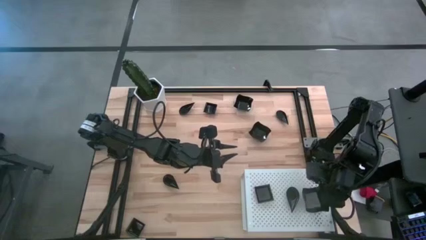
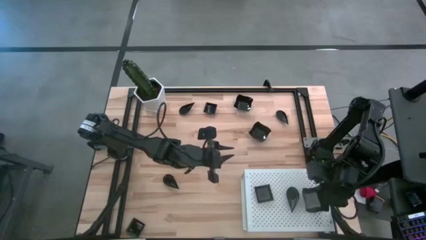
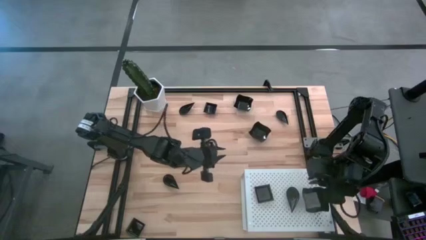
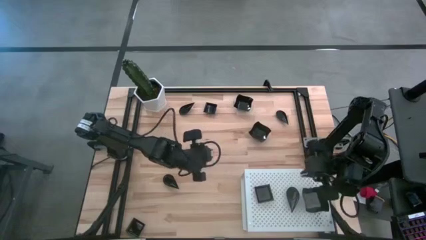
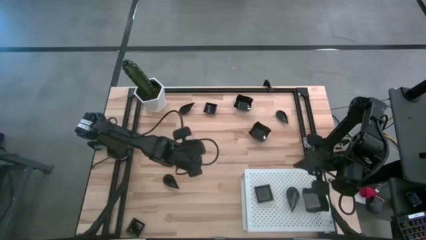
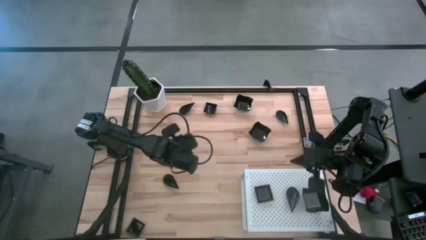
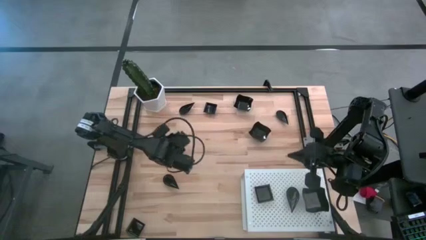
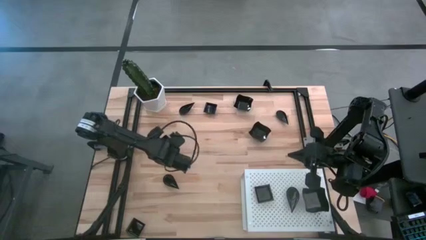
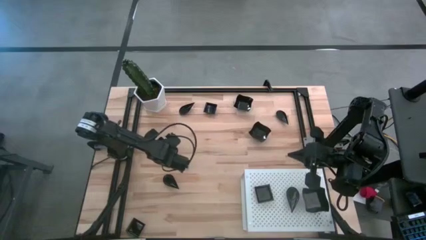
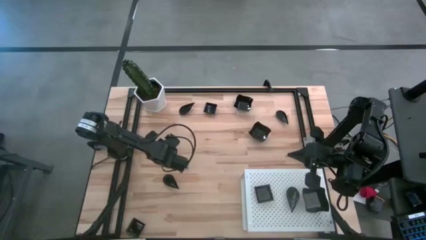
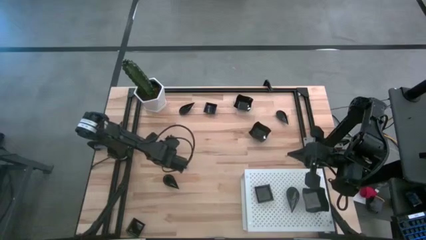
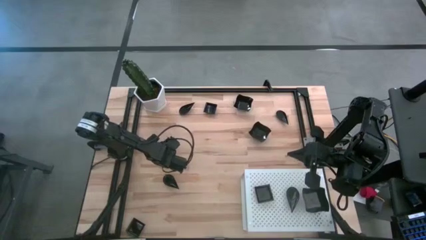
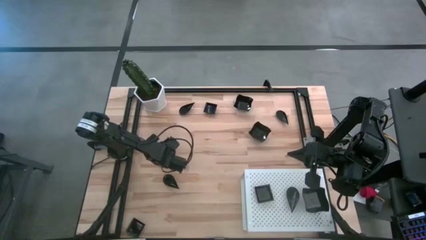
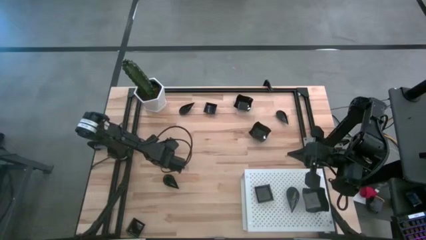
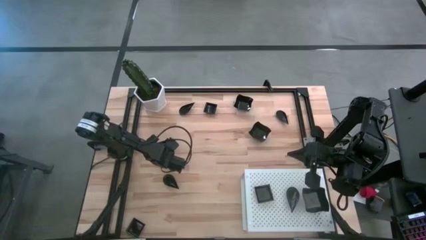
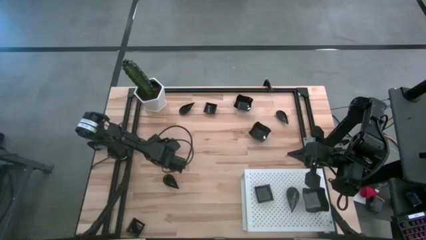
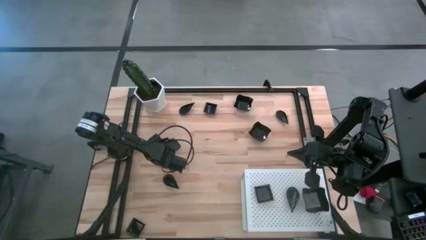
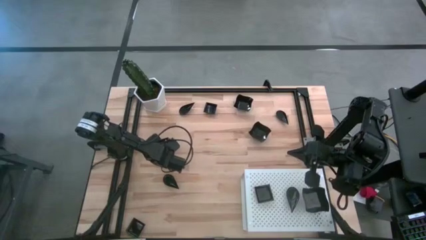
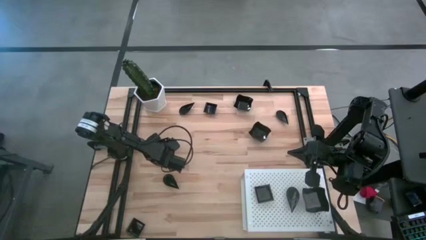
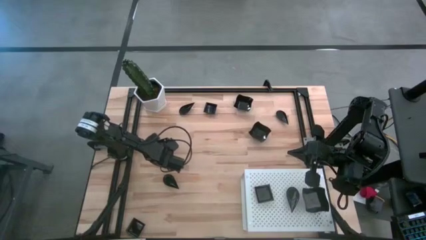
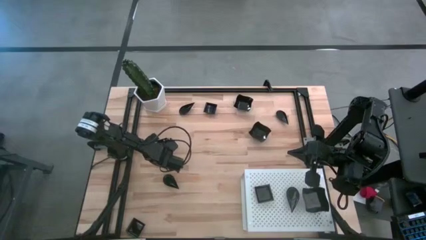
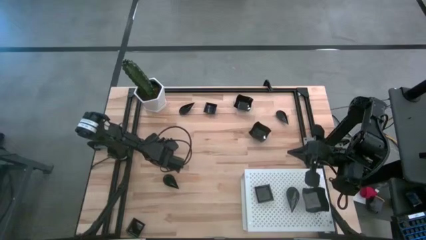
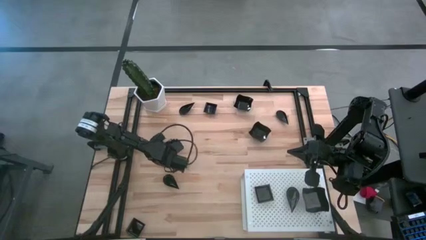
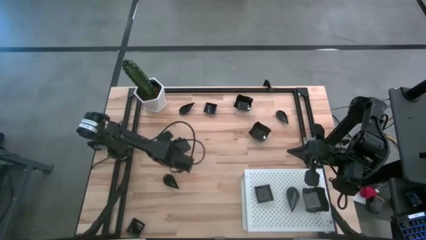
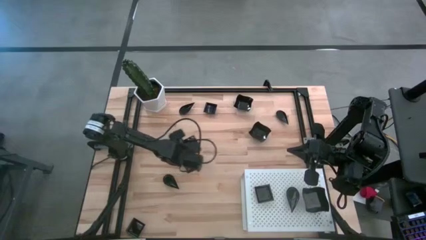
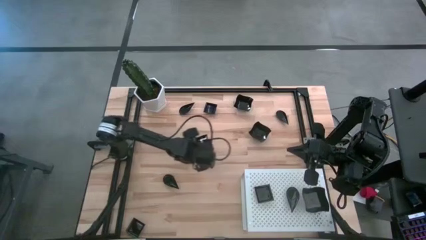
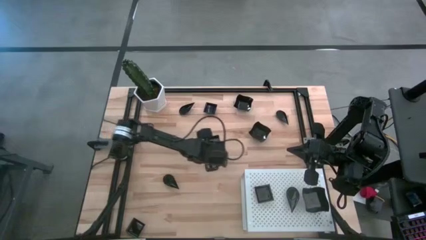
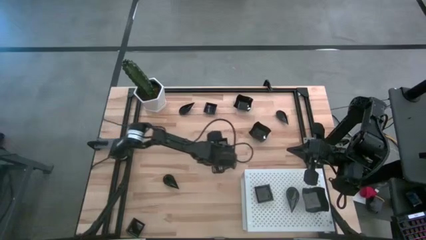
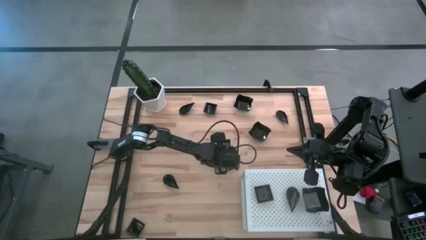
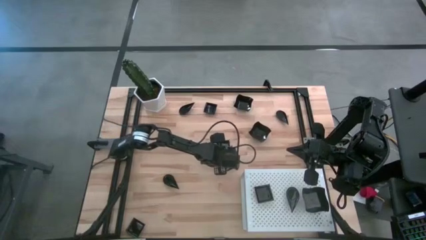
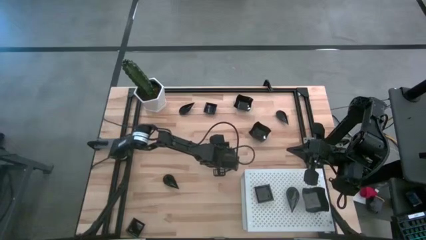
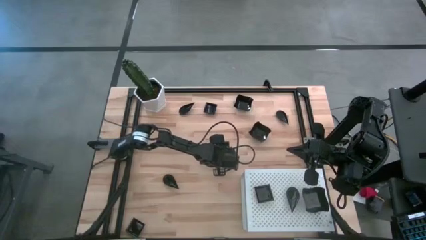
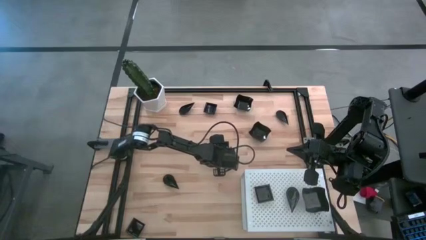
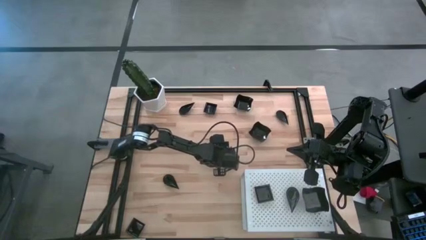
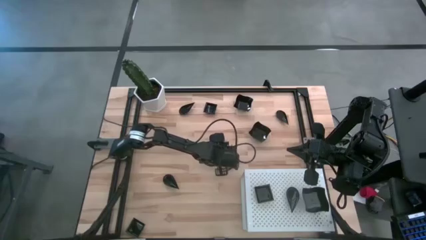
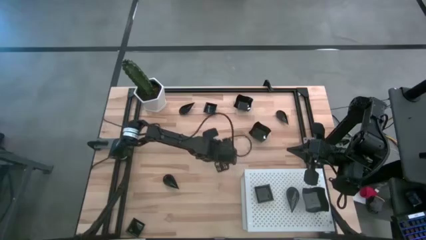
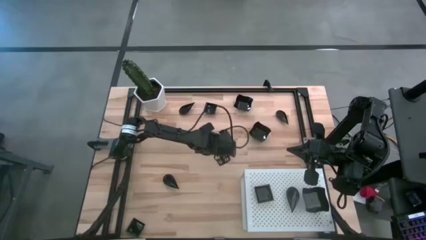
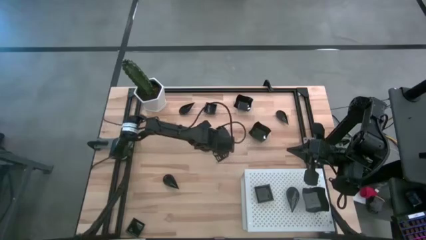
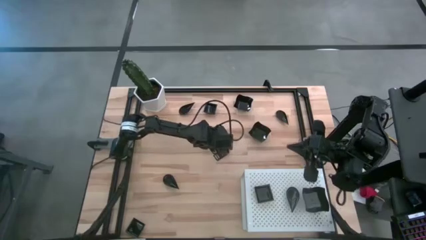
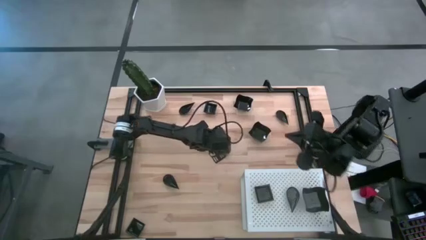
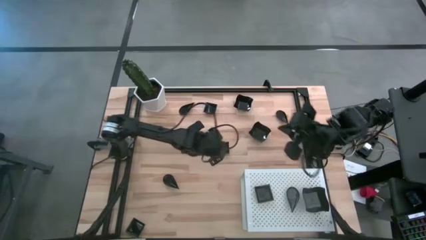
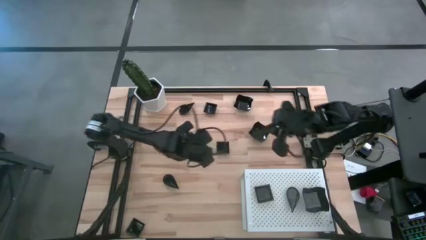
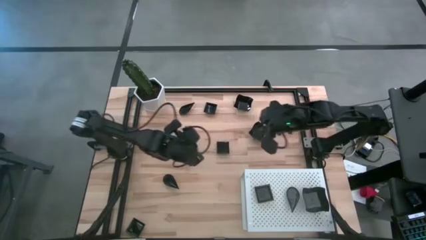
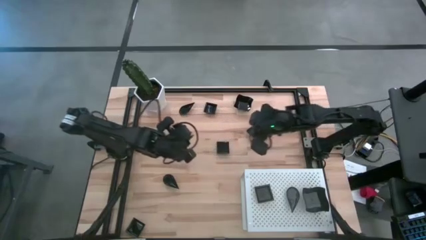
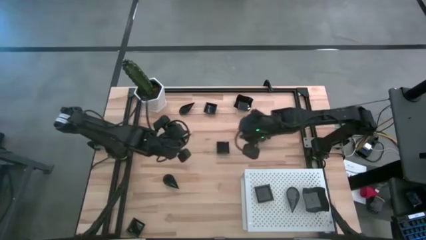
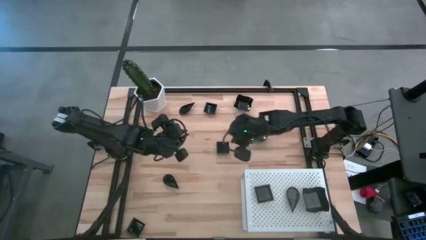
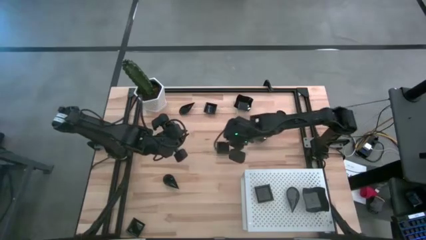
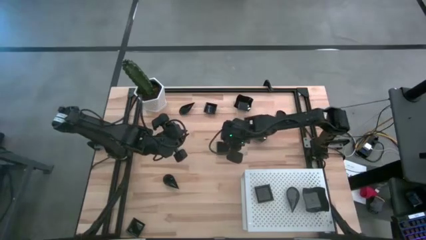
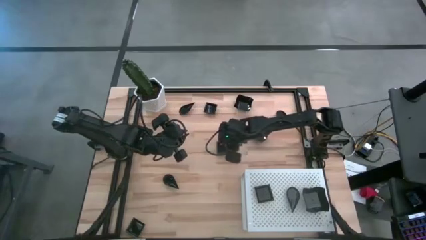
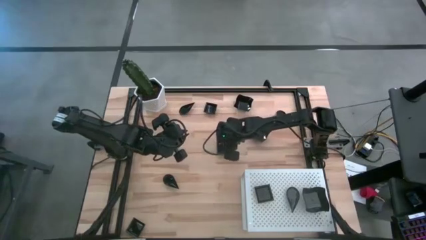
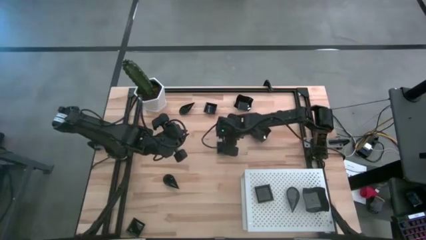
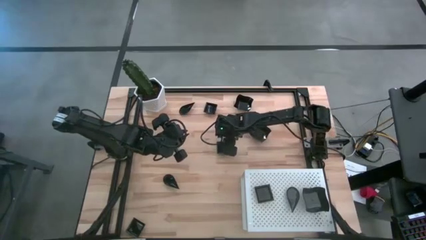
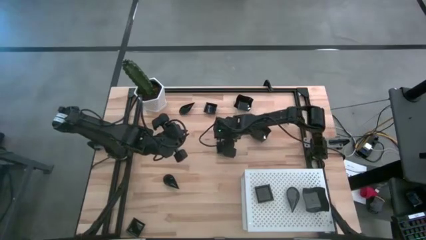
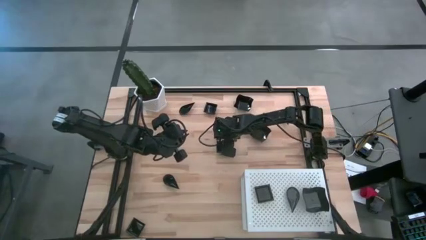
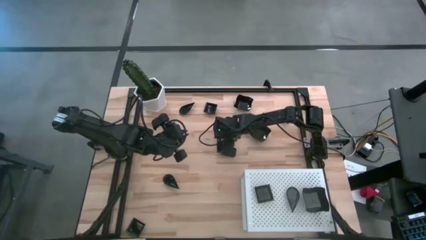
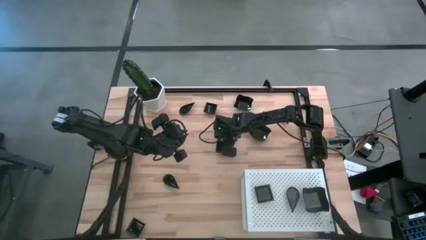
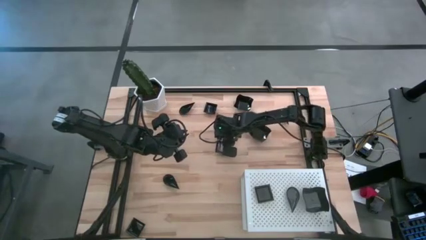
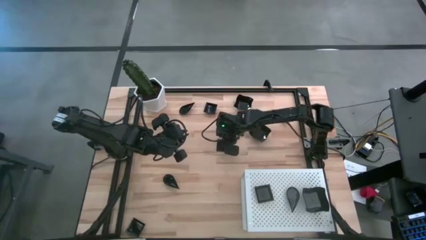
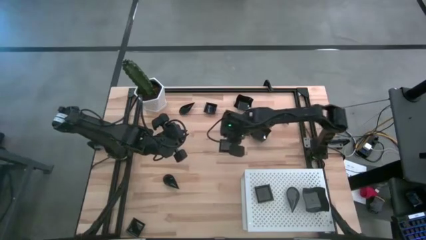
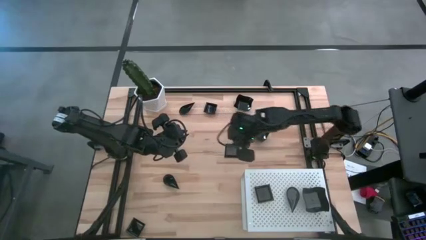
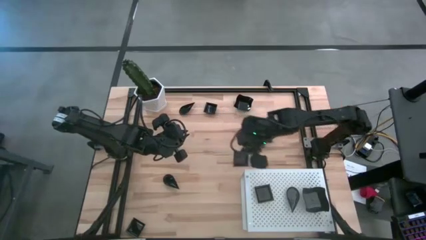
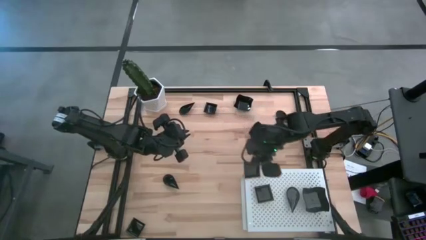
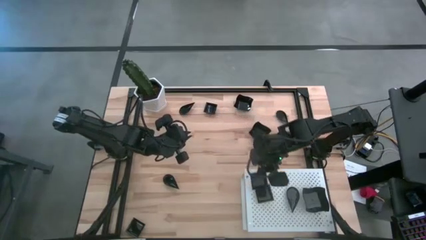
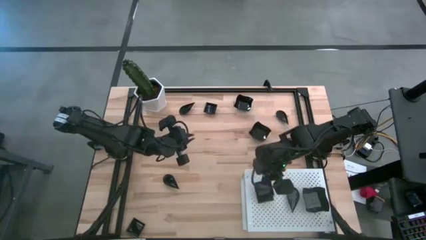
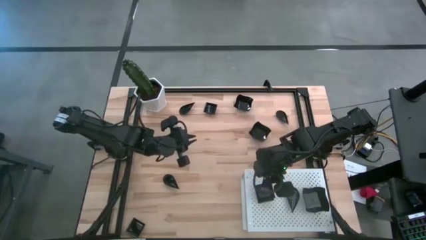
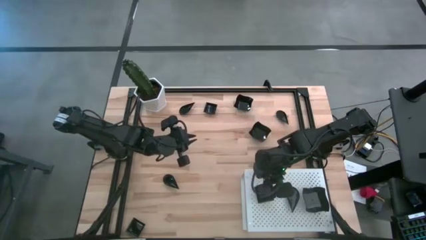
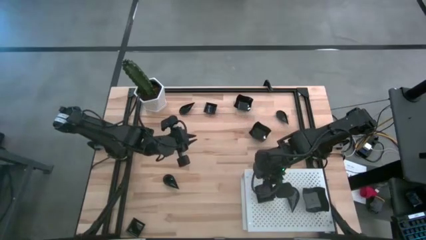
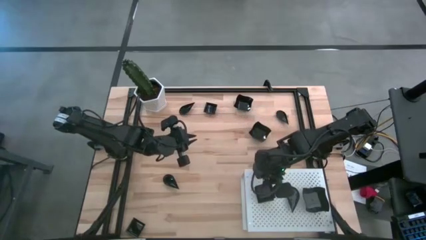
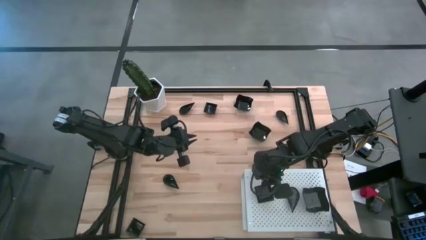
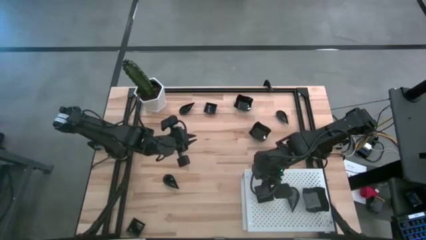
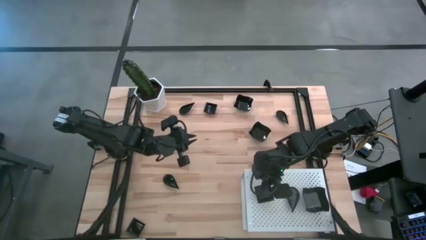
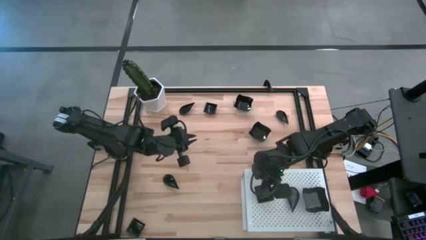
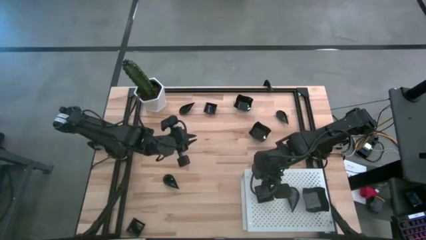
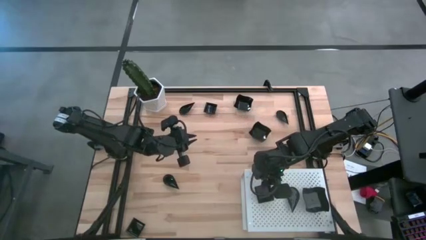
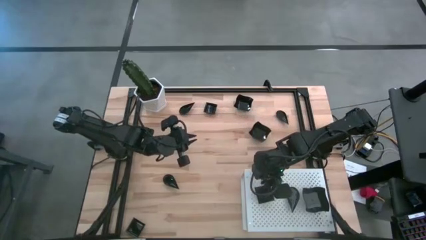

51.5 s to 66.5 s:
Task: Pick & Place Mini shaped plates
Stack the square plate on top of the other square plate on the shelf

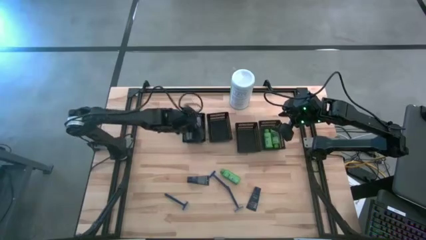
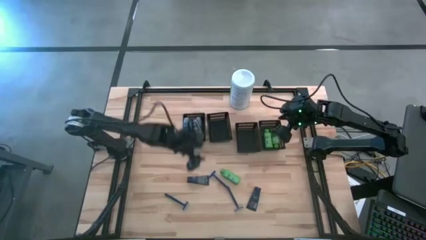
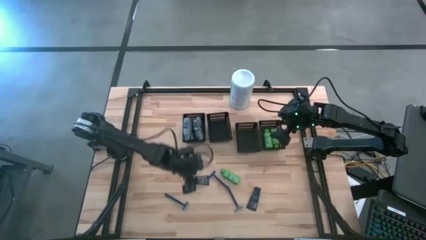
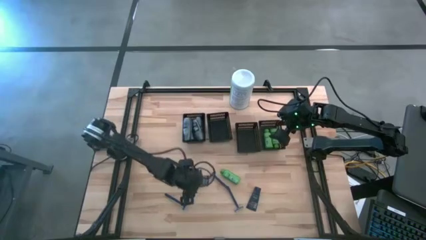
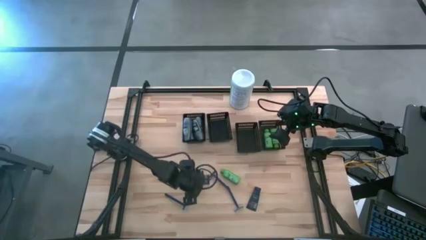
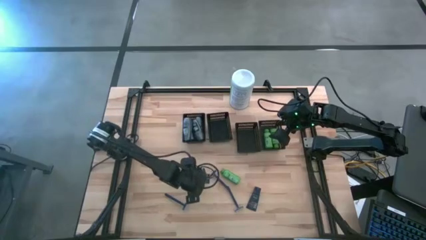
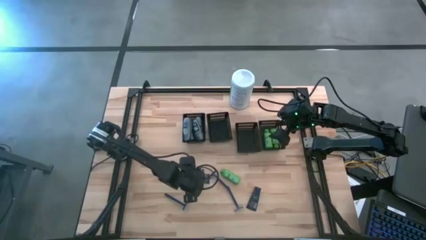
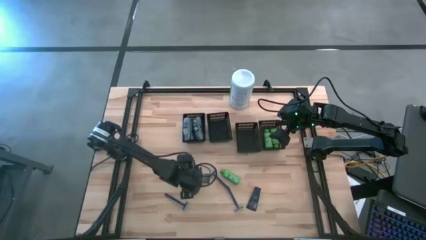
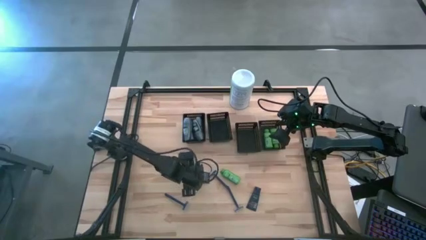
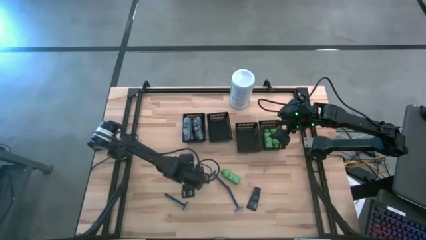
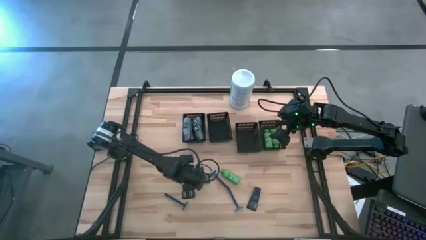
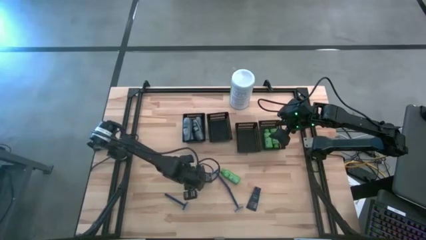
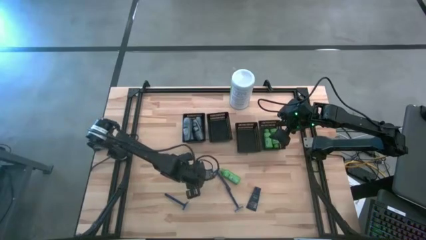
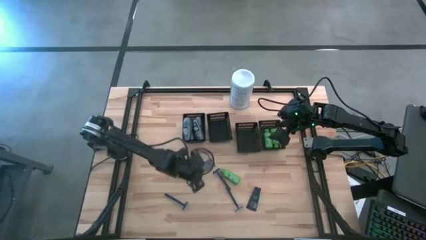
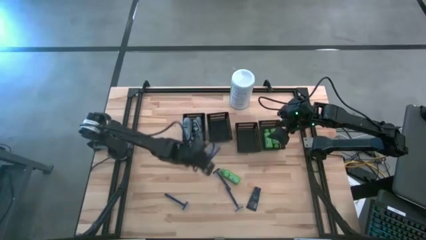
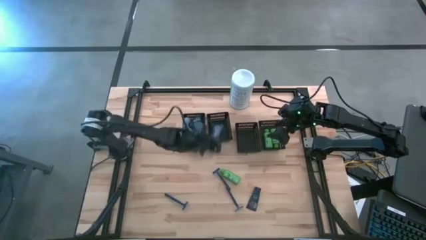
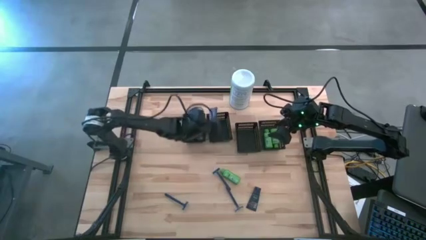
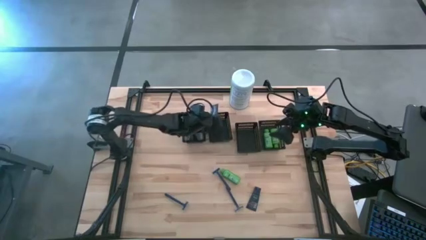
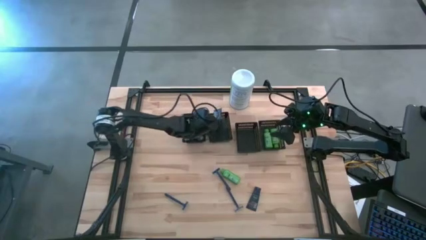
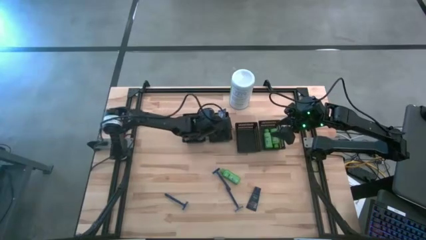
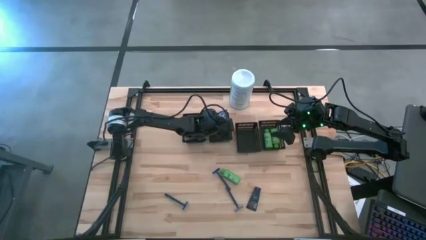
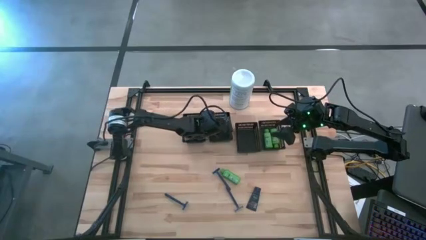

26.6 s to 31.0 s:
Task: Pick & Place Travel size toiletries
Put the blue shave cream into the middle left black bin
